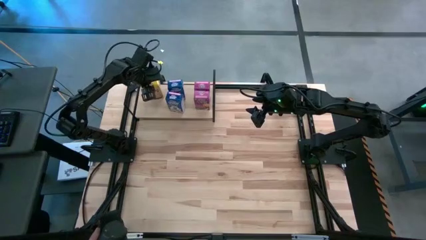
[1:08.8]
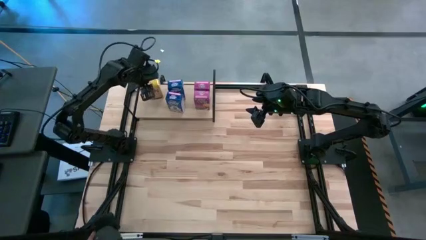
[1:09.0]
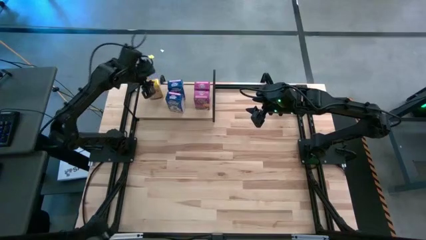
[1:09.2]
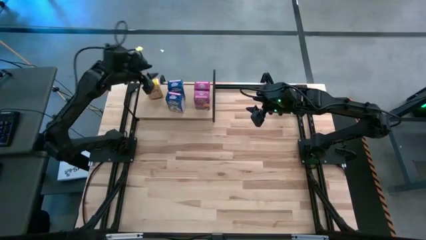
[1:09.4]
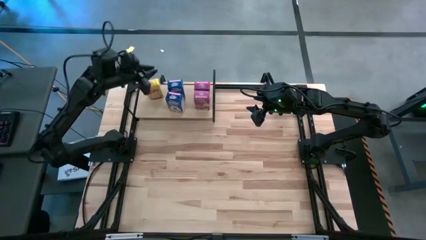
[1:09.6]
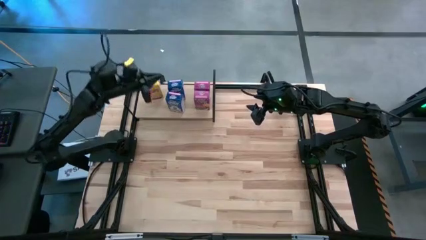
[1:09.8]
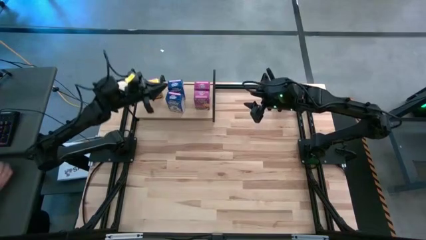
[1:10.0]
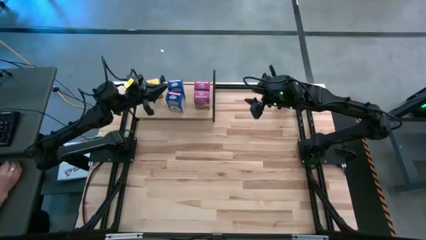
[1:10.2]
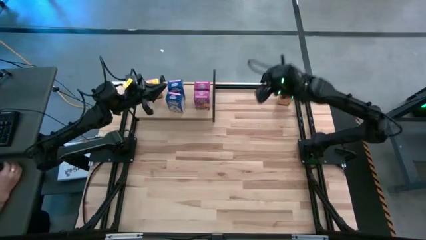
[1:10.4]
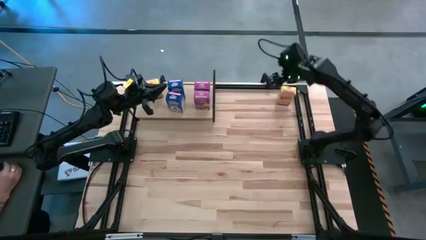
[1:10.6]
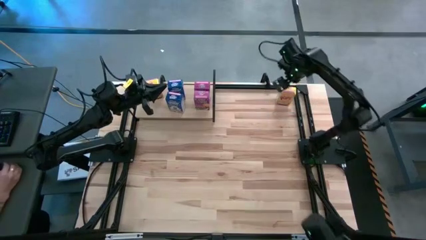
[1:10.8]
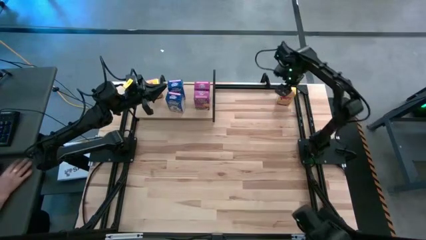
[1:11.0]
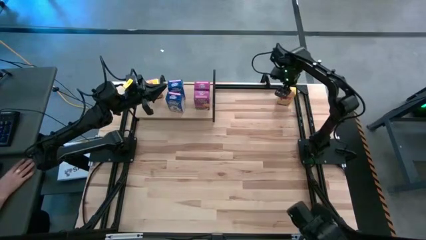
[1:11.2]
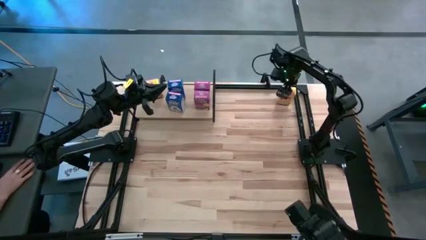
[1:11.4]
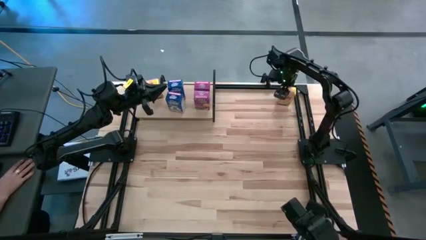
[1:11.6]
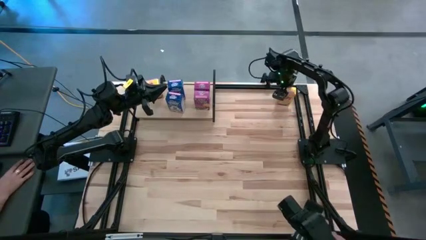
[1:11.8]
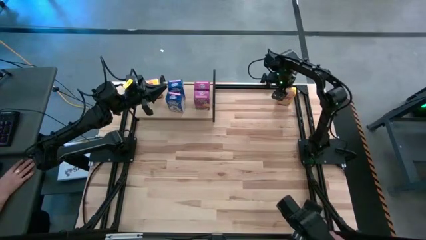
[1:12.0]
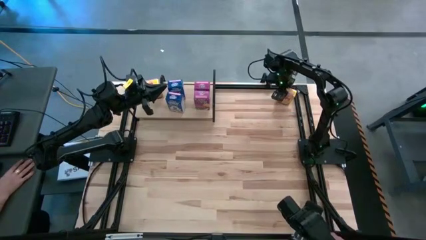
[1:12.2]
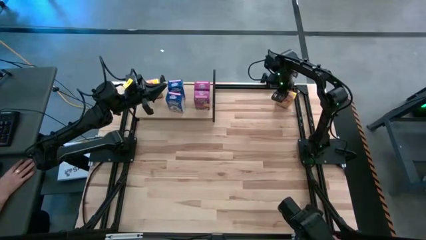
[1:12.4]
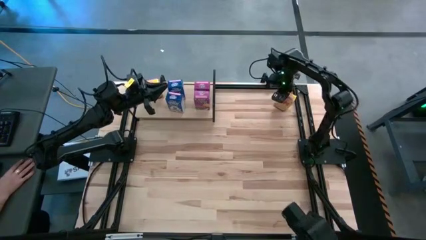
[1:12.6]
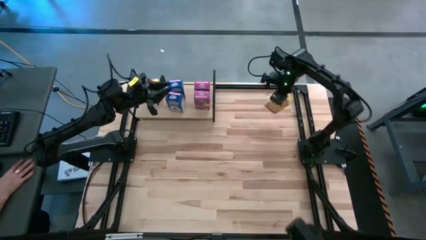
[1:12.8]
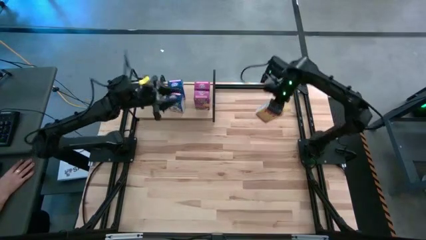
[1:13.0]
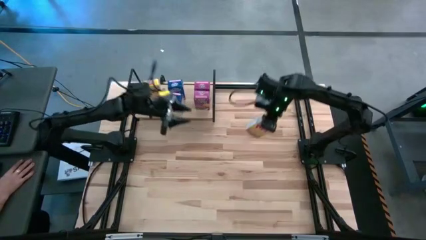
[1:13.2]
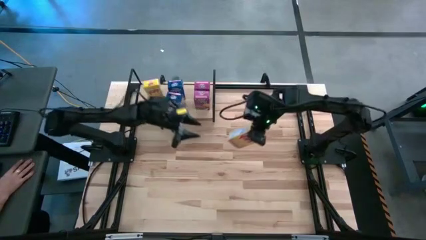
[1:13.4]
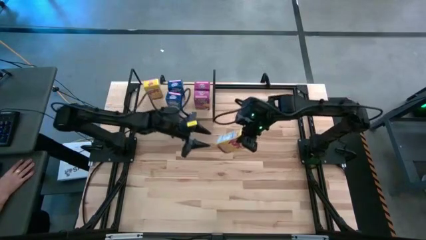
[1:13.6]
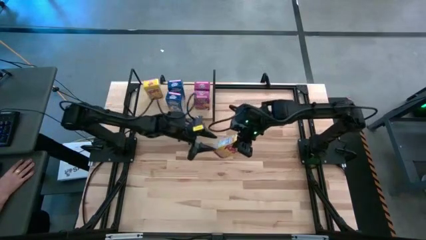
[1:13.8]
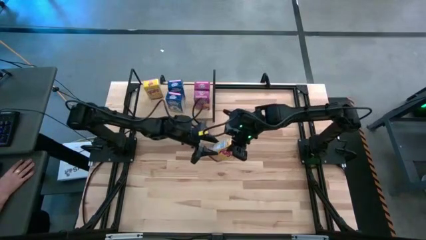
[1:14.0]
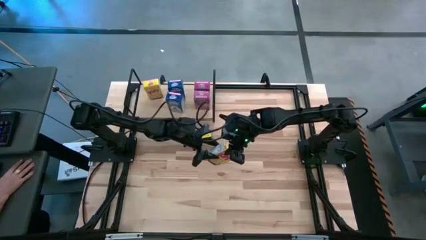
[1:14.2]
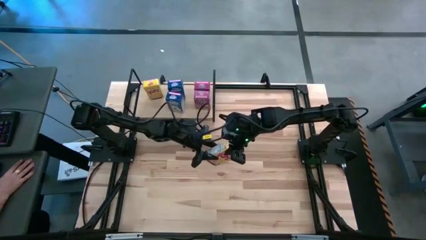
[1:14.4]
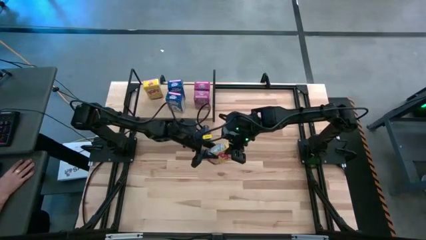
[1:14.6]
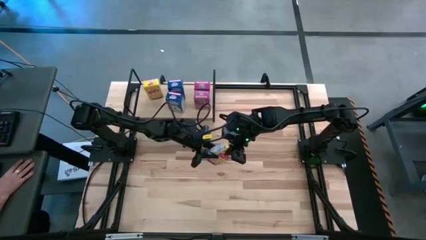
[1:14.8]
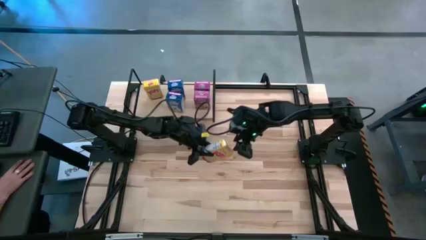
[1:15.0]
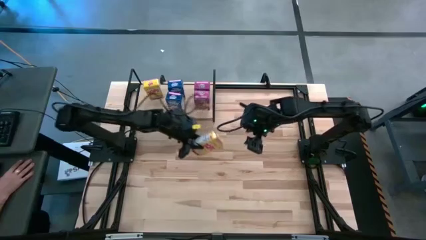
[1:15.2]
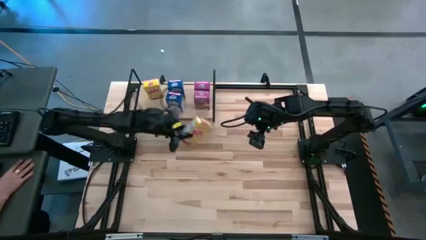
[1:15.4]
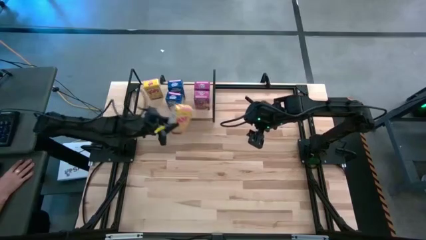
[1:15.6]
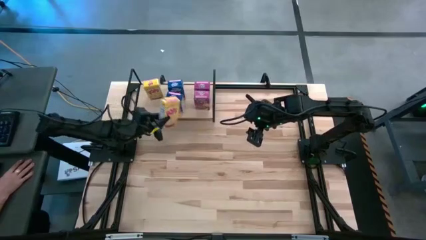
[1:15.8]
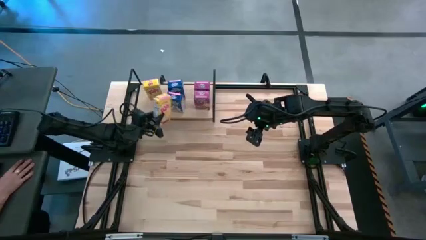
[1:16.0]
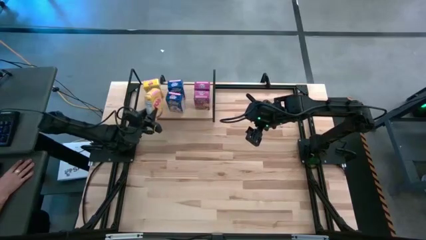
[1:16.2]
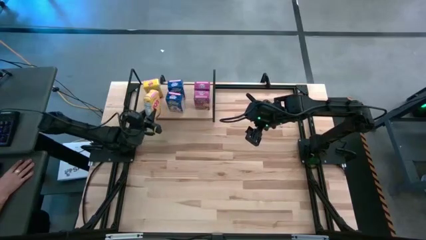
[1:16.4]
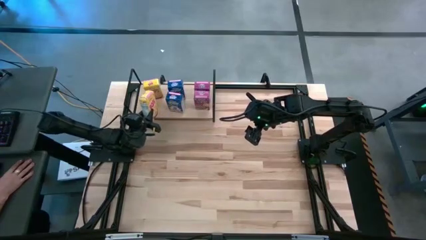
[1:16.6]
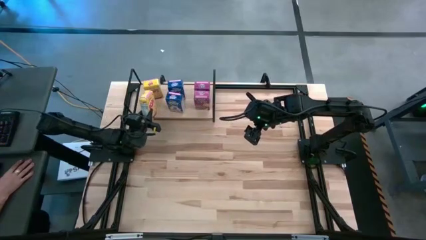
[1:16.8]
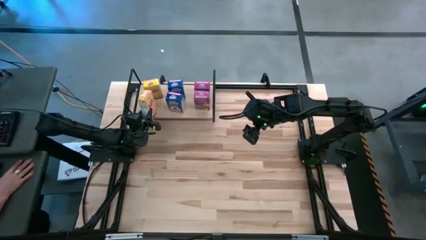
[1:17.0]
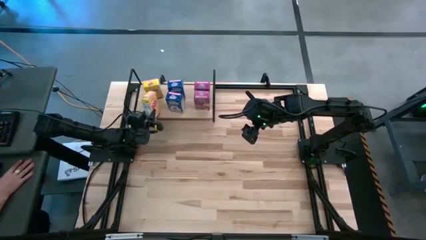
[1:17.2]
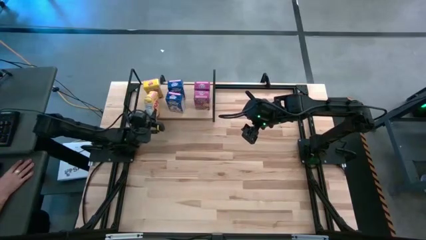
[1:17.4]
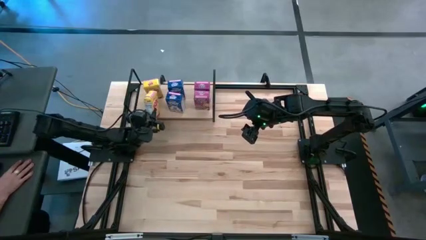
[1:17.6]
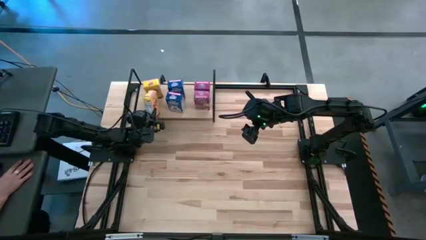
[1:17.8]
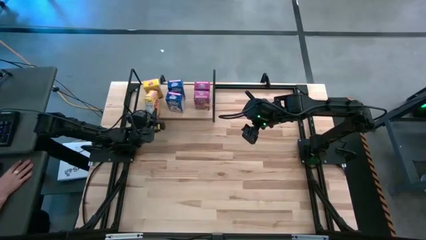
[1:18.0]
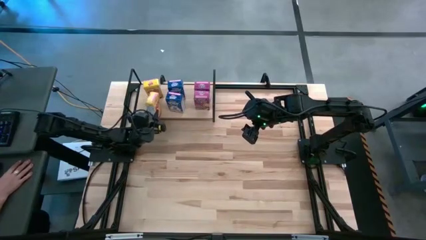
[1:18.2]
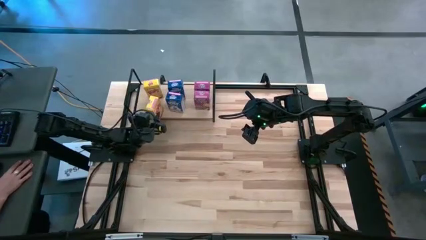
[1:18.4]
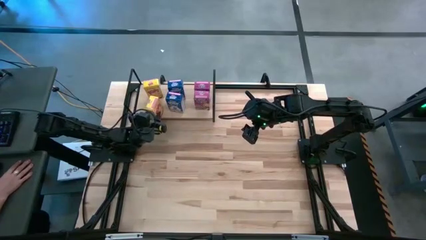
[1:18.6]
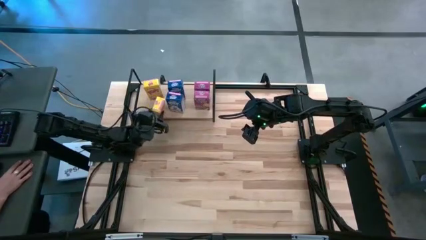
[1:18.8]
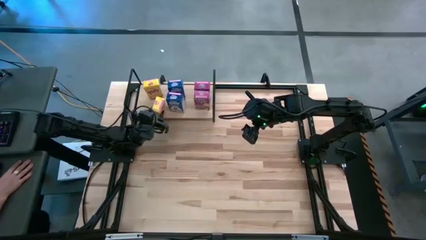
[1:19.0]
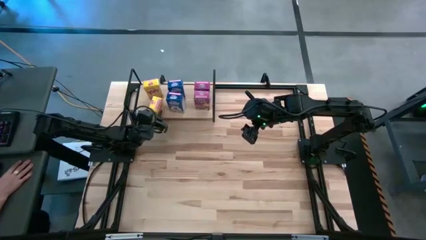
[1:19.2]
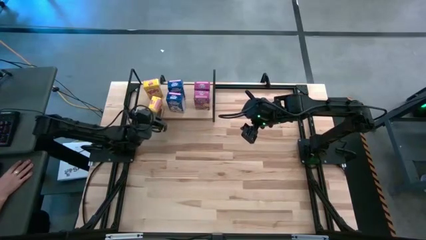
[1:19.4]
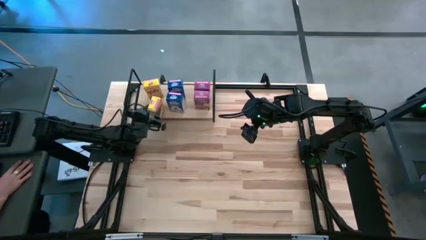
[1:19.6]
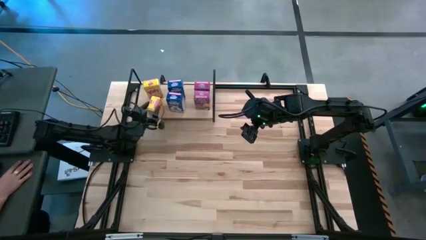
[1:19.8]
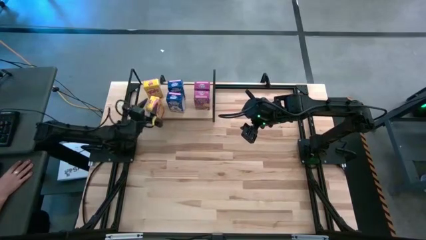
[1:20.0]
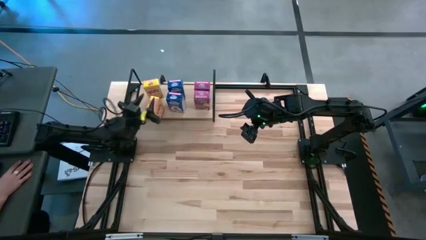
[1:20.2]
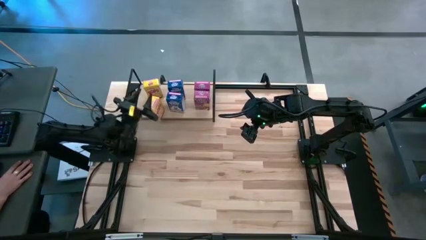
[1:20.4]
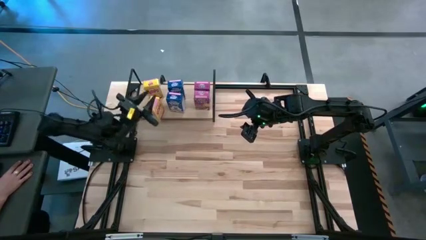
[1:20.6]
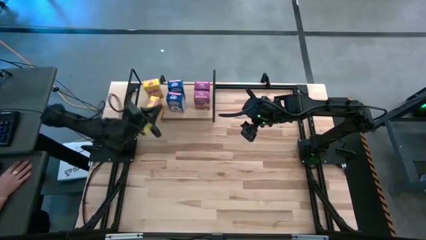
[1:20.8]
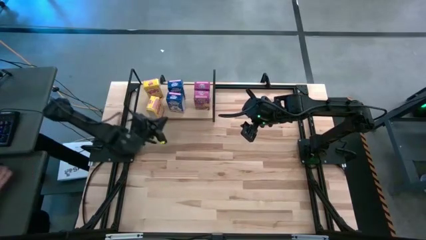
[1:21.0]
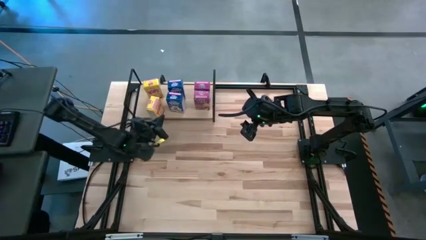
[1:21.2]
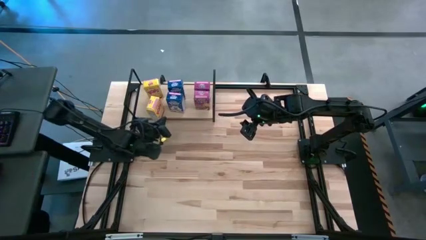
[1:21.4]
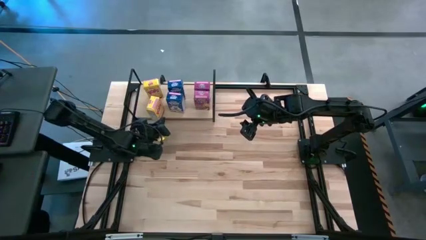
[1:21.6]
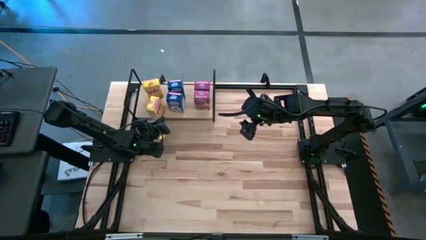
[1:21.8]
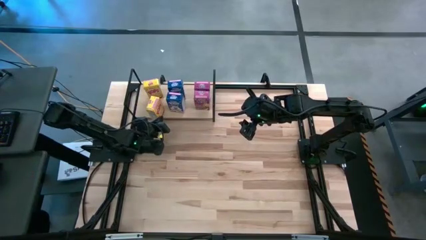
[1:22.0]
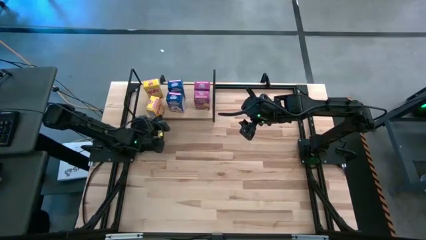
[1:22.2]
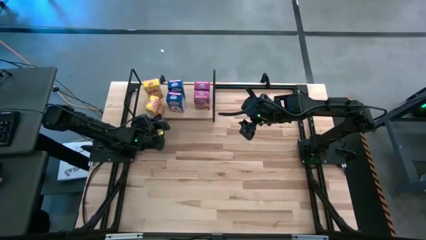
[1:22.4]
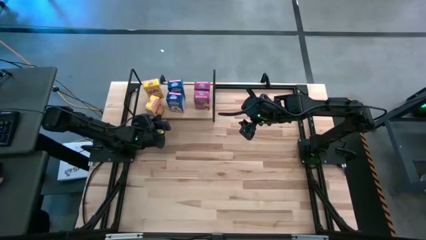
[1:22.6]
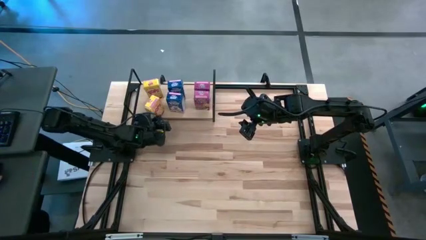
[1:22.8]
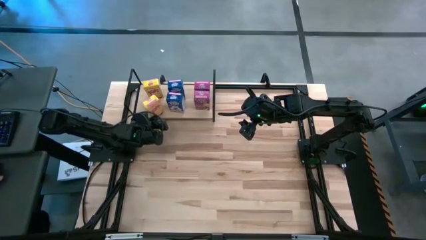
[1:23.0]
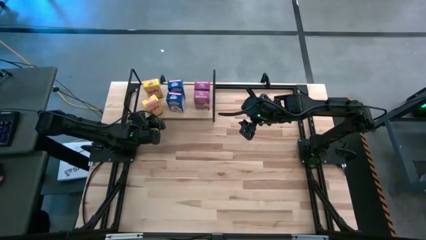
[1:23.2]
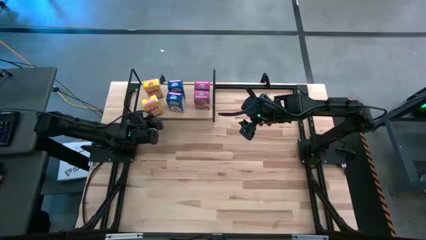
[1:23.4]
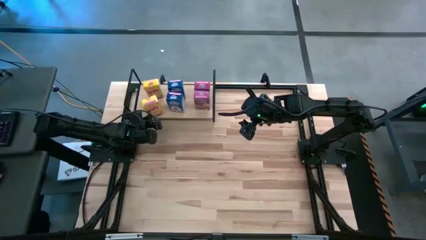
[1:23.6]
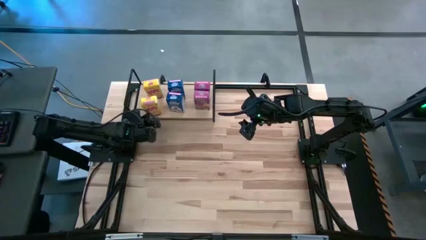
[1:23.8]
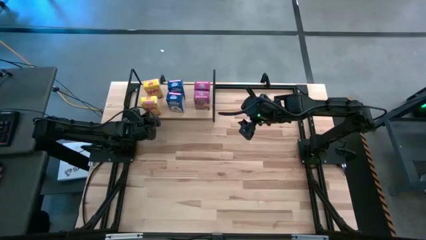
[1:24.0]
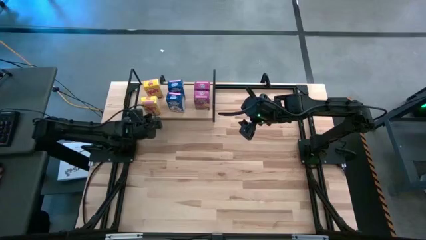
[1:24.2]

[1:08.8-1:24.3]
Task: Stack cereal on shelf
Align the yellow cereal box on the shelf

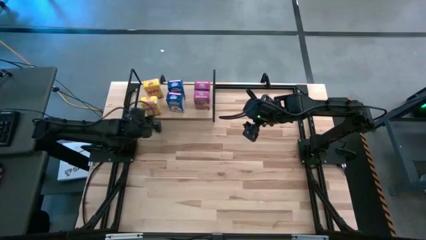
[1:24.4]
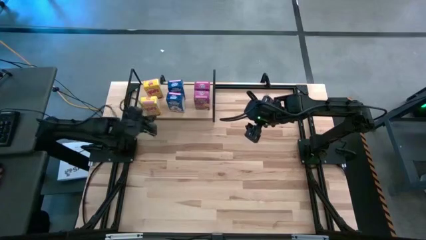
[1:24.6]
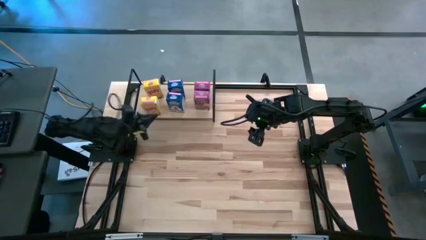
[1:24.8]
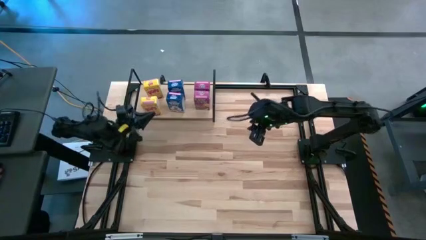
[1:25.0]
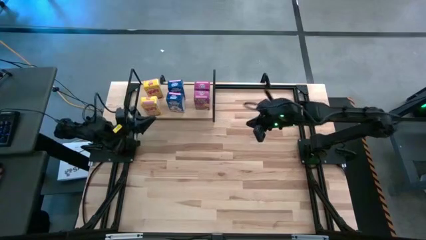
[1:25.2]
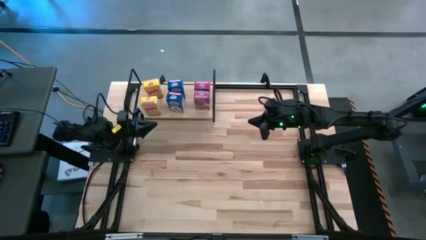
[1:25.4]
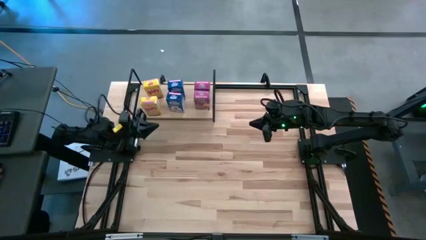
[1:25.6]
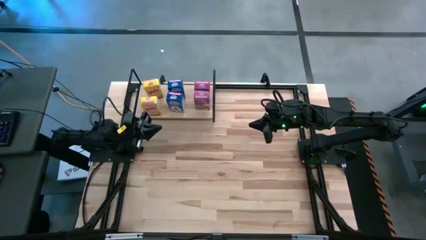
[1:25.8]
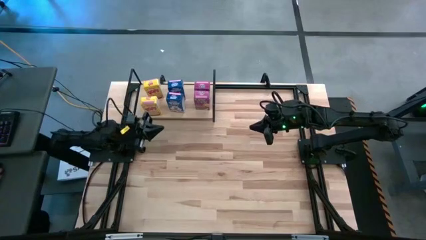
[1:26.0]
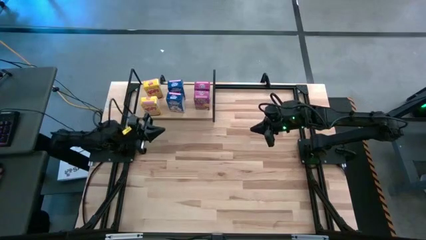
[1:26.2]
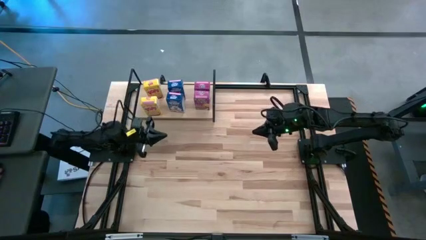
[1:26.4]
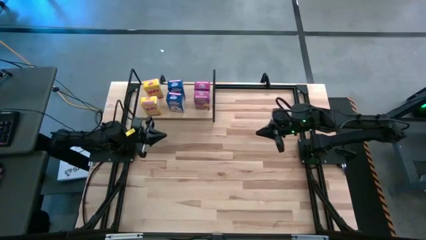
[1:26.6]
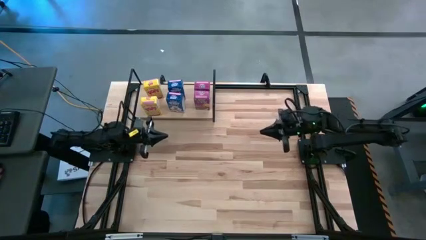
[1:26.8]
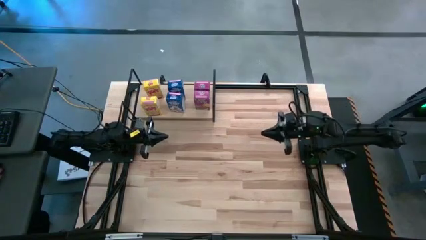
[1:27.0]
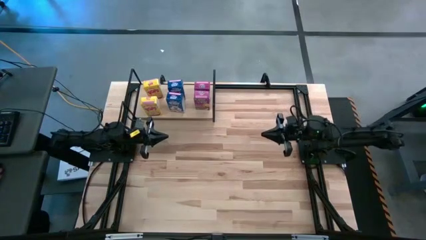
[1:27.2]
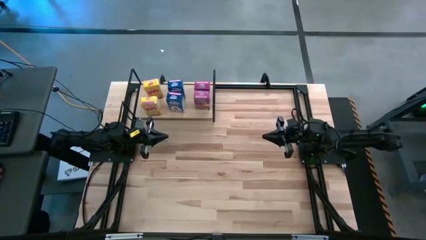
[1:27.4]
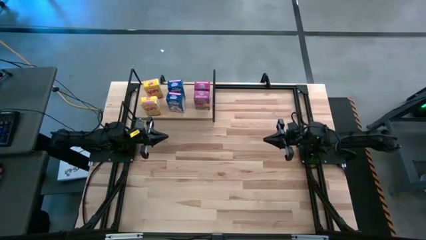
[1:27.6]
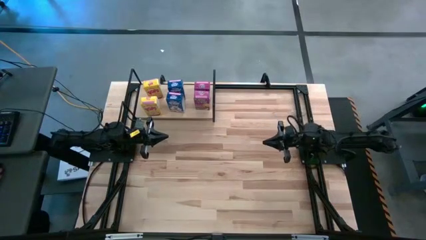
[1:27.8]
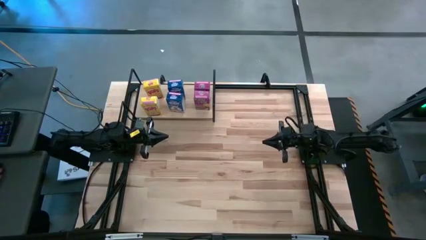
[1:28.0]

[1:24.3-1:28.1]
Return to Home Position
